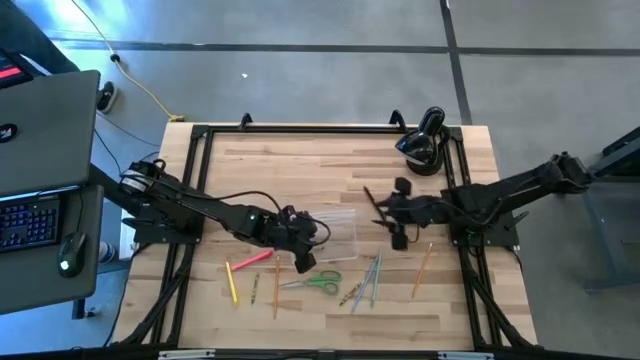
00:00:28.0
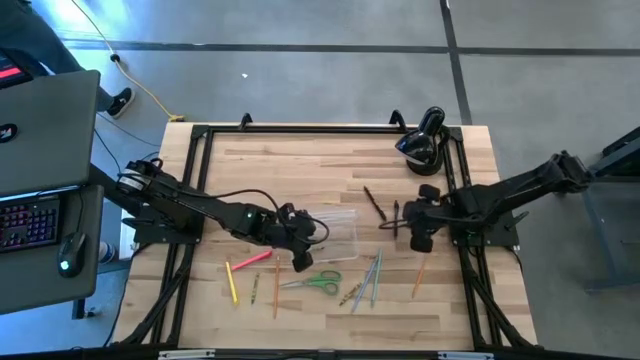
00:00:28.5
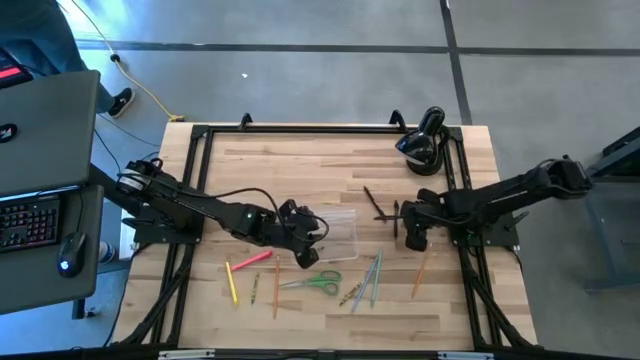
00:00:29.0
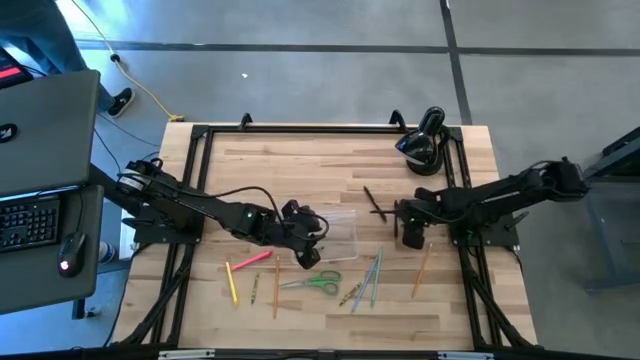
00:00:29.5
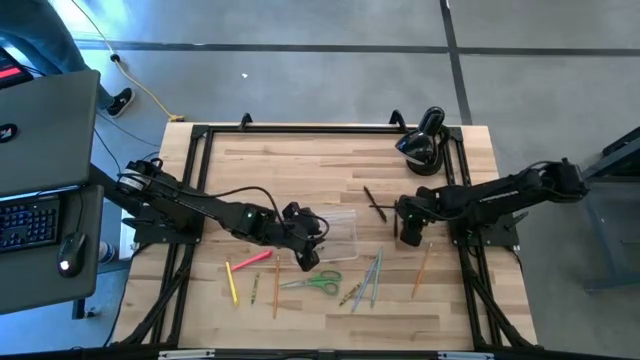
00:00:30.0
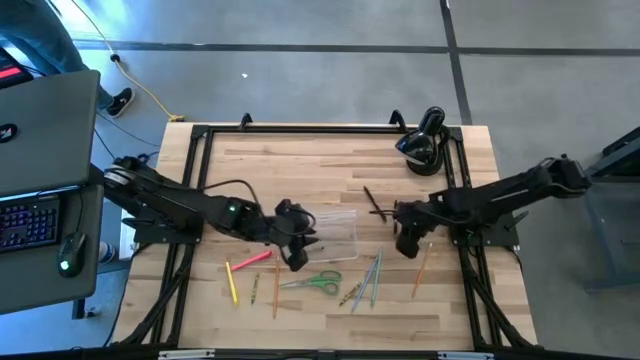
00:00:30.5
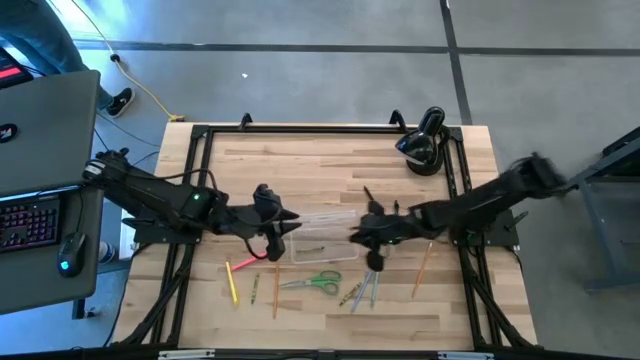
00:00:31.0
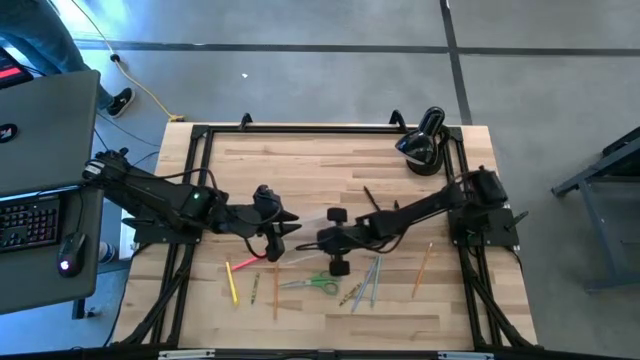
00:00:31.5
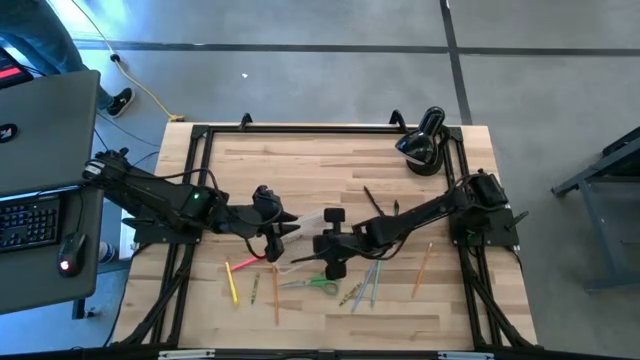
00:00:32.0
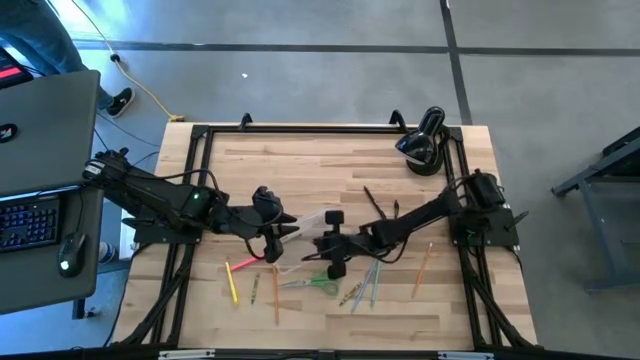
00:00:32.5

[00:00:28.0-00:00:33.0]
Task: Pick & place school supplies into a supply box
Put the top right green crayon into the supply box

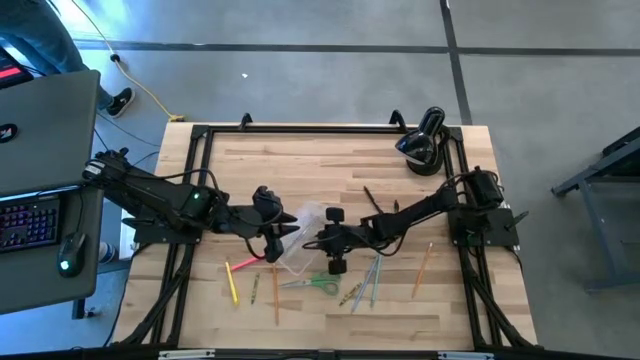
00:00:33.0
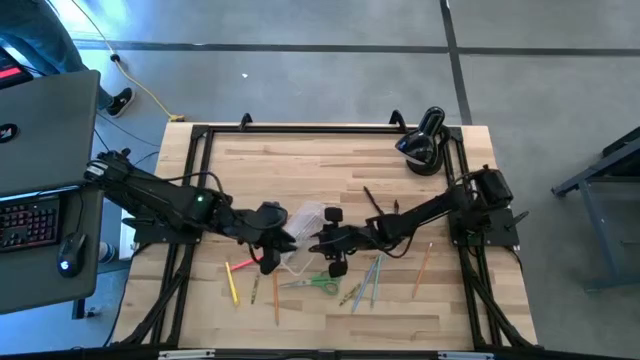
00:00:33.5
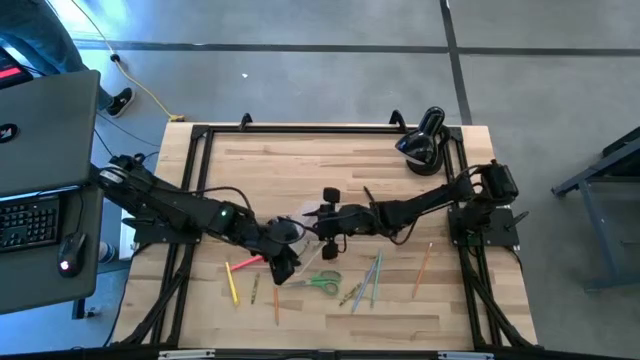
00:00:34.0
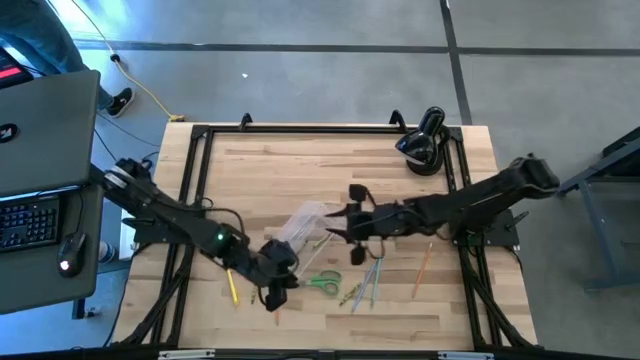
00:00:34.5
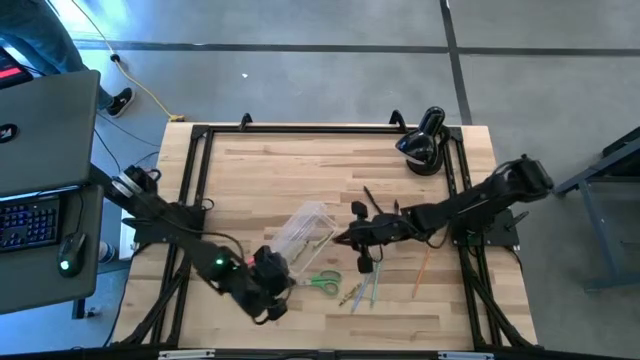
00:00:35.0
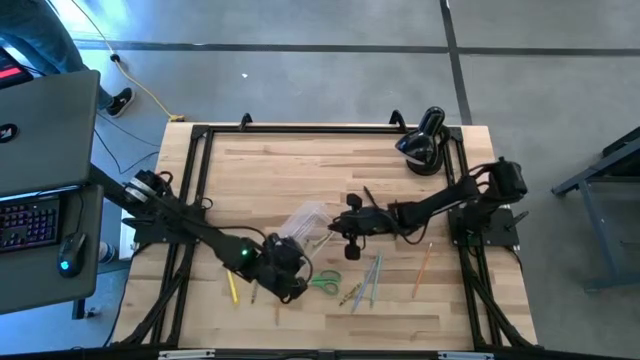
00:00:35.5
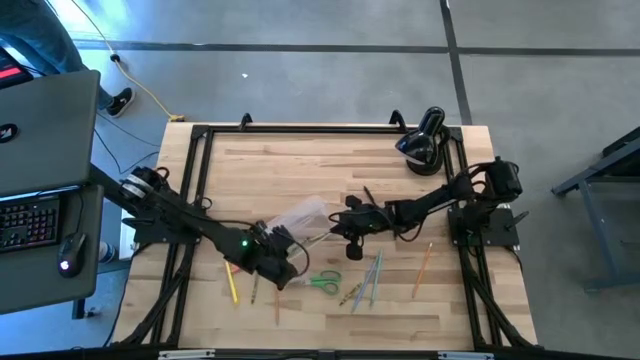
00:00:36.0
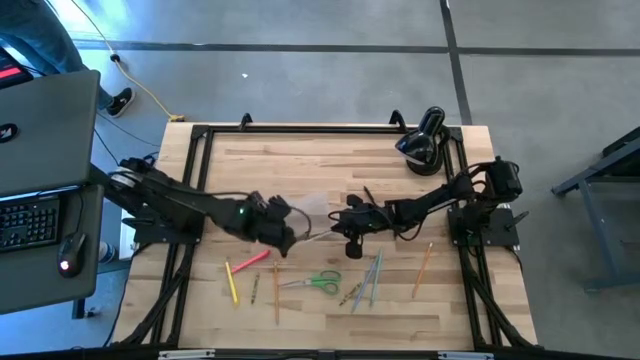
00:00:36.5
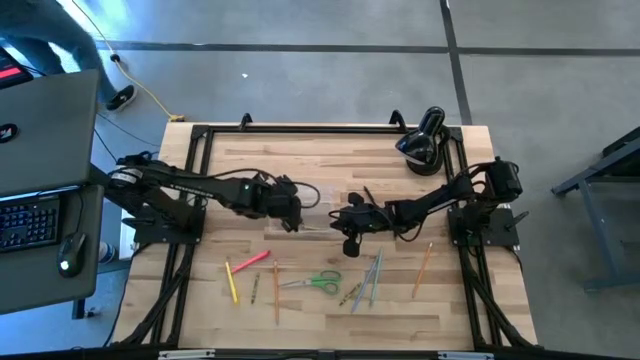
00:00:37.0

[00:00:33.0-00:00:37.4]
Adjust the supply box

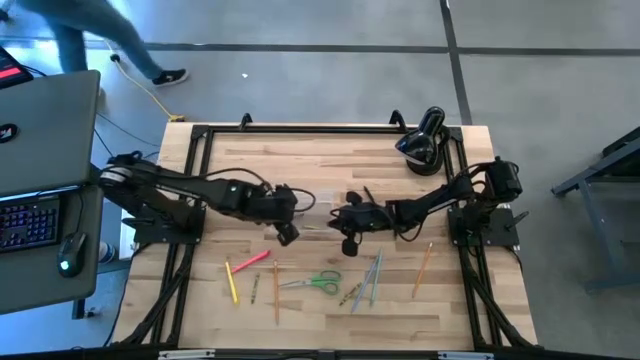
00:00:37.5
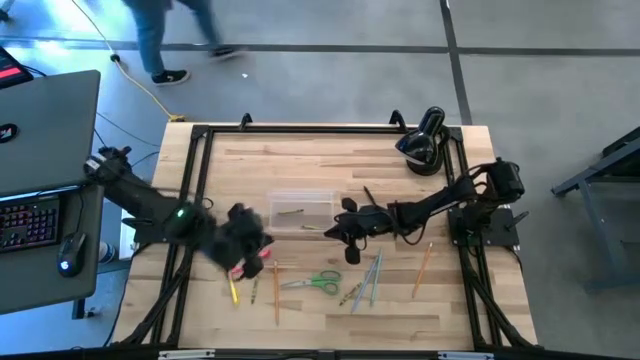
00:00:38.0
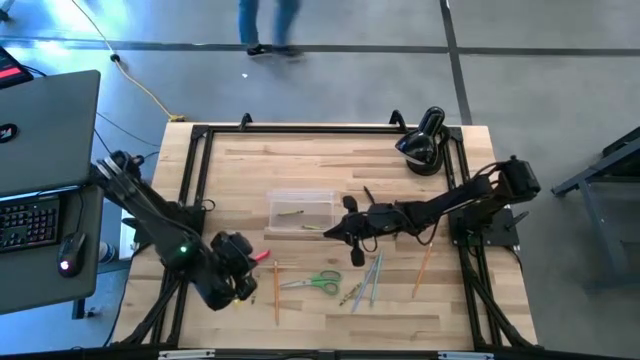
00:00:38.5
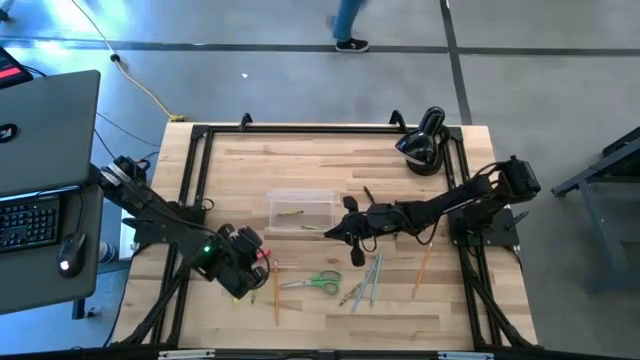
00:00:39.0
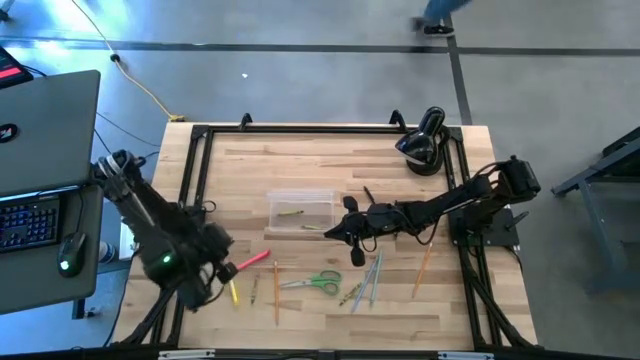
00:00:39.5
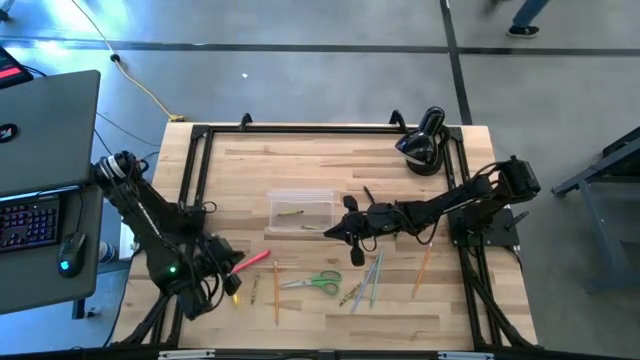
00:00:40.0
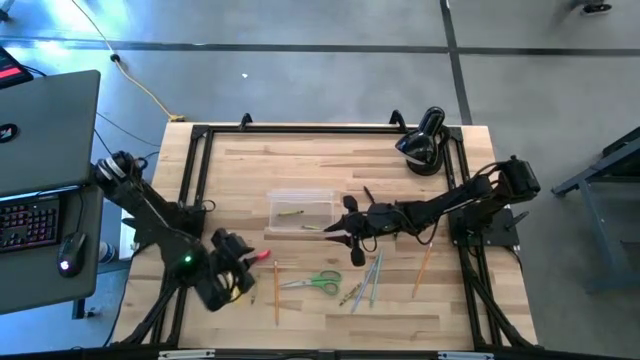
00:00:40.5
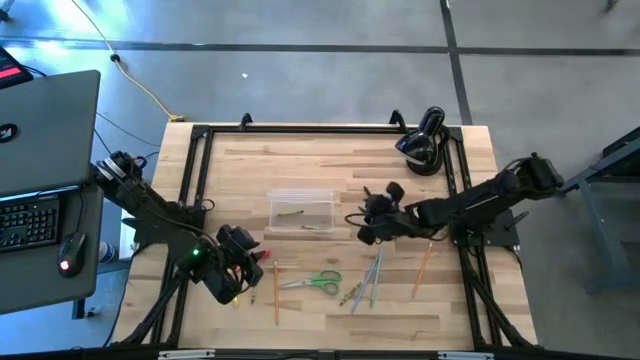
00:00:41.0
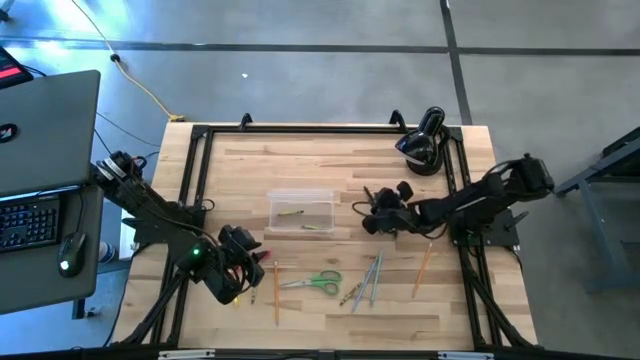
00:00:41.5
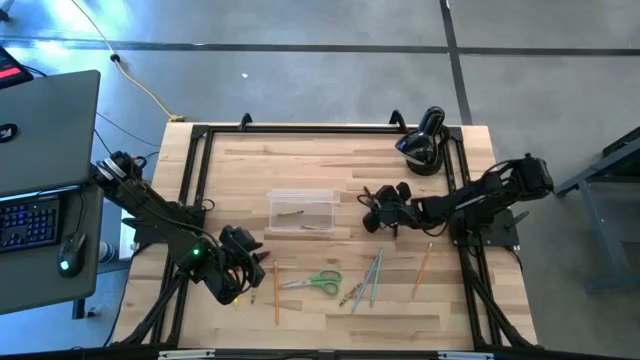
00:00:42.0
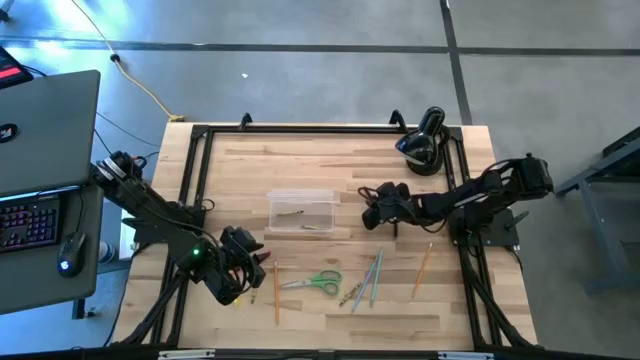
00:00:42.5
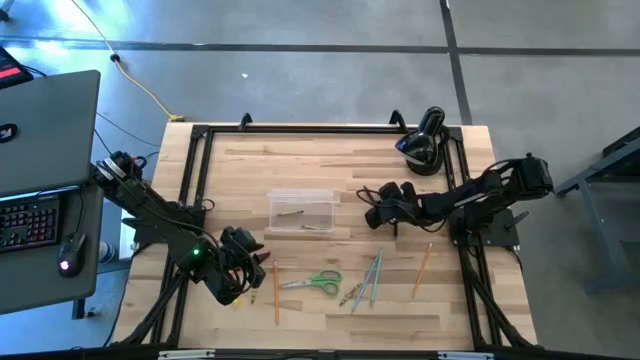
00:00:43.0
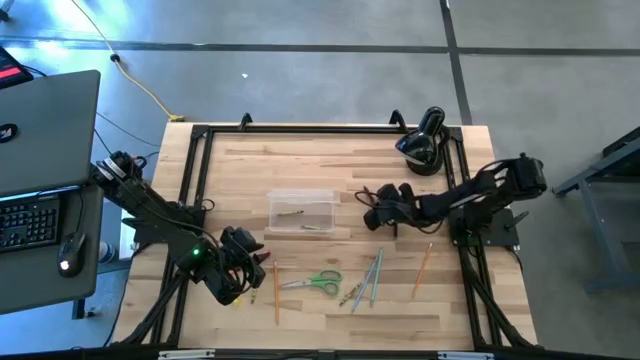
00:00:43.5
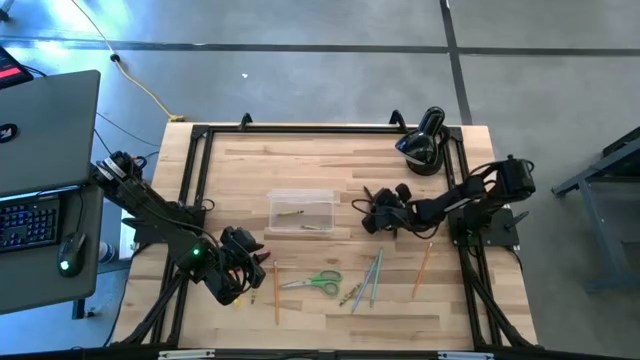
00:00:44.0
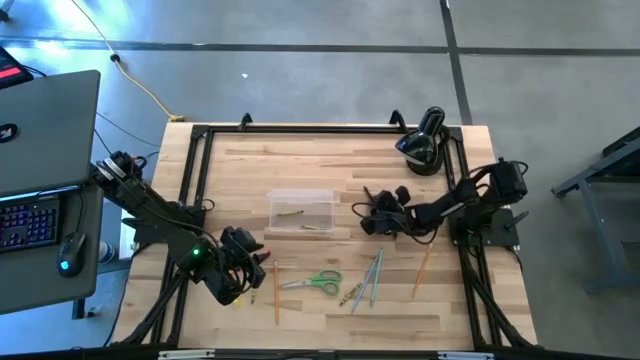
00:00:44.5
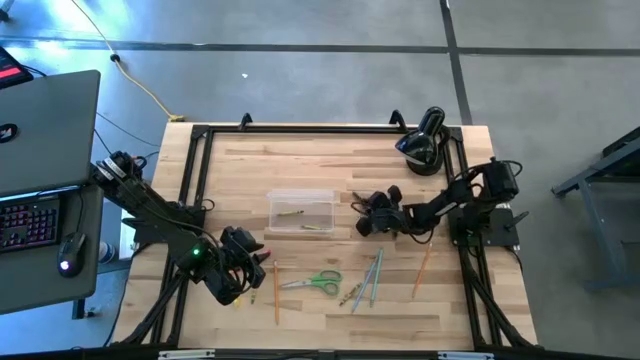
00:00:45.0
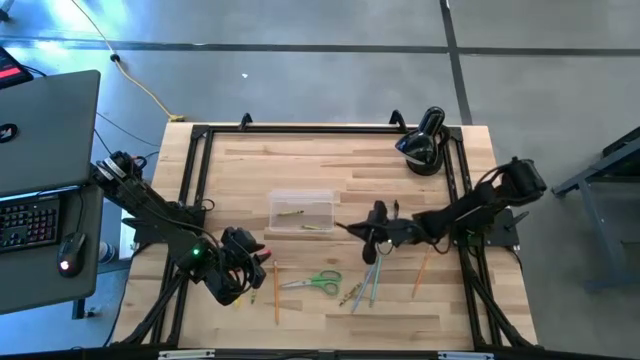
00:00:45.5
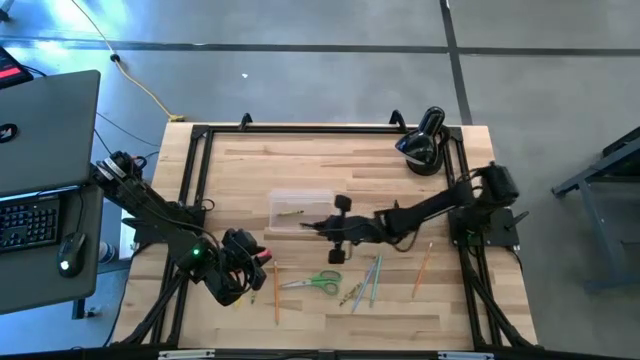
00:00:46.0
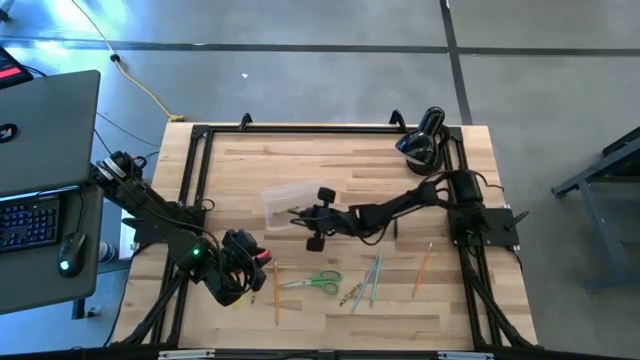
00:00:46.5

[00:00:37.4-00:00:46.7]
Put the black pen into the supply box

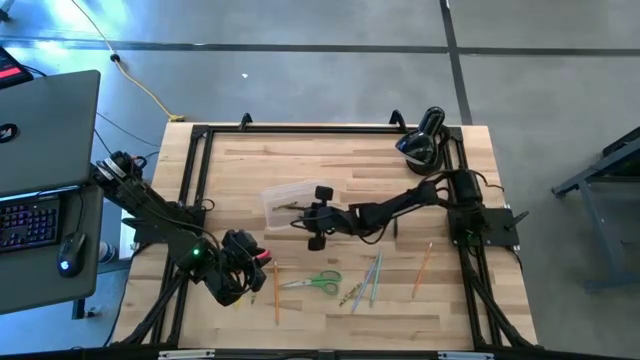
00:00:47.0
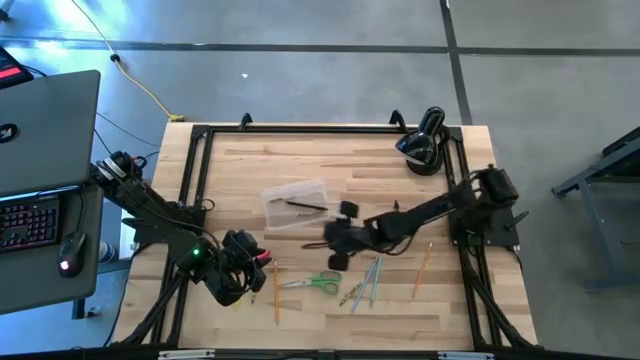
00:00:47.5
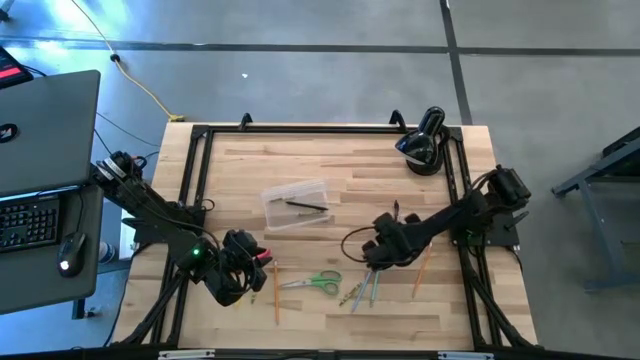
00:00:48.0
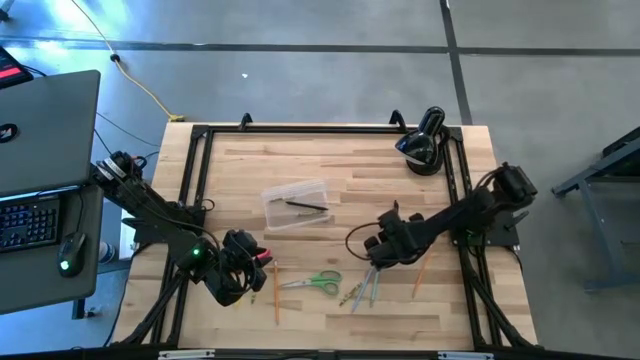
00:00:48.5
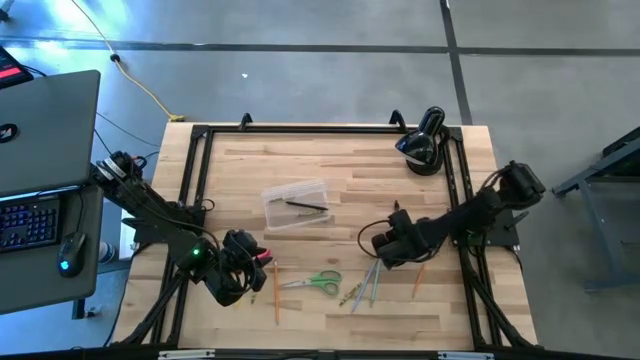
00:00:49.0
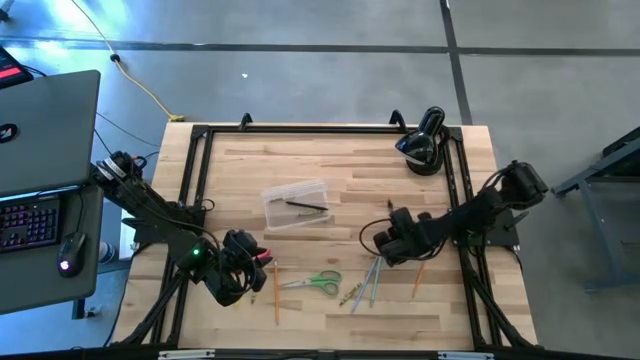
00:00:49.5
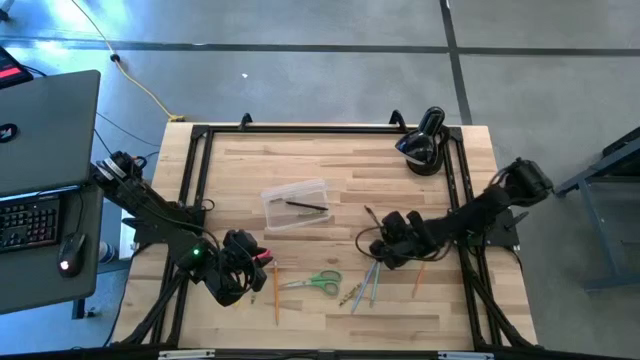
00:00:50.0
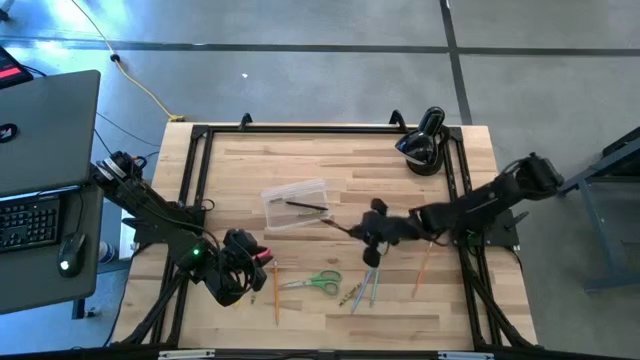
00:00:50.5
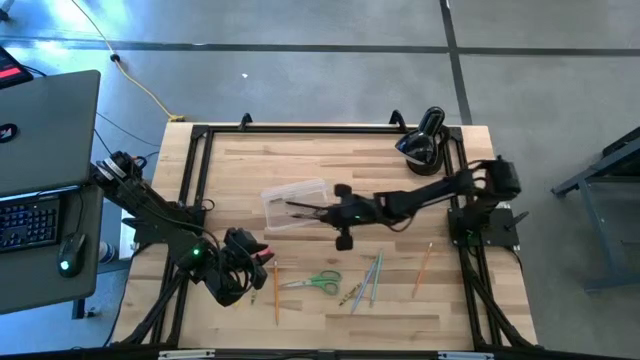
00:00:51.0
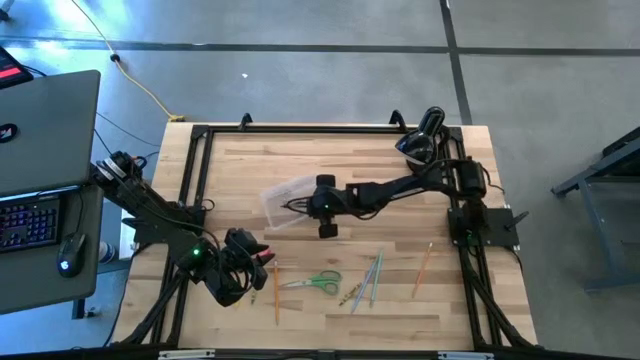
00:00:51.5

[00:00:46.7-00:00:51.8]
Put the transparent black pen into the supply box
